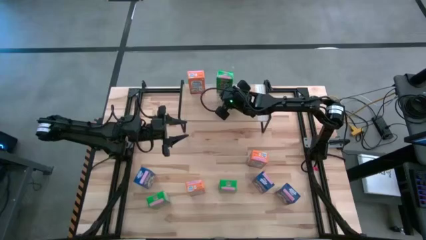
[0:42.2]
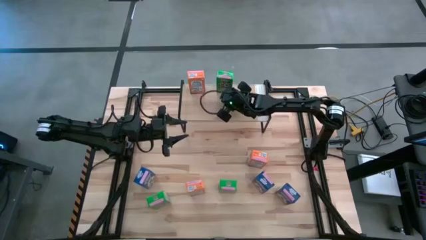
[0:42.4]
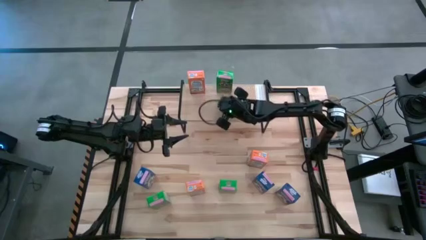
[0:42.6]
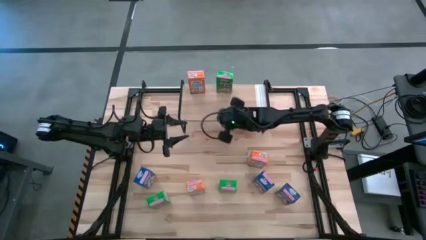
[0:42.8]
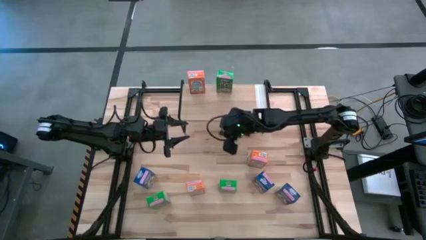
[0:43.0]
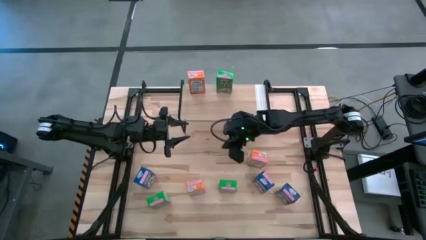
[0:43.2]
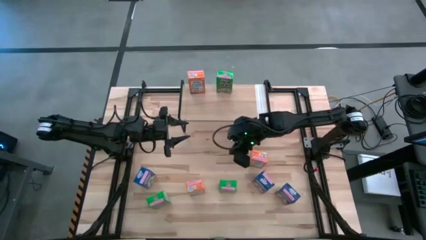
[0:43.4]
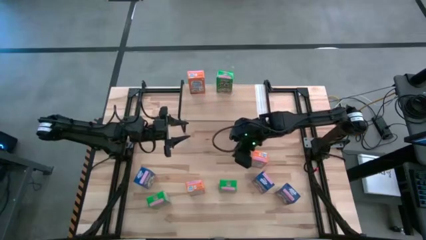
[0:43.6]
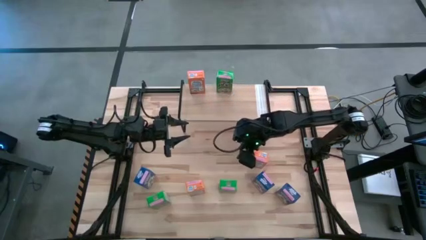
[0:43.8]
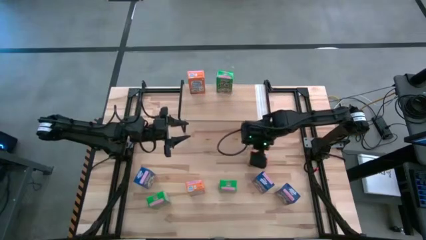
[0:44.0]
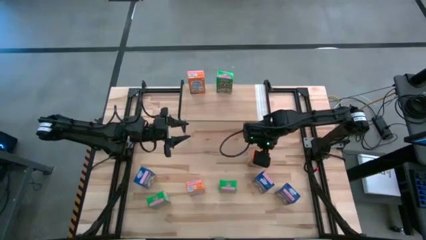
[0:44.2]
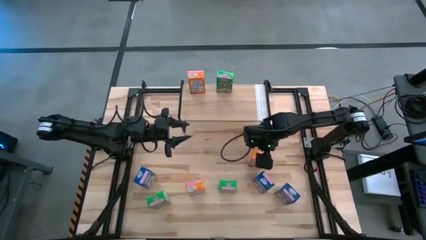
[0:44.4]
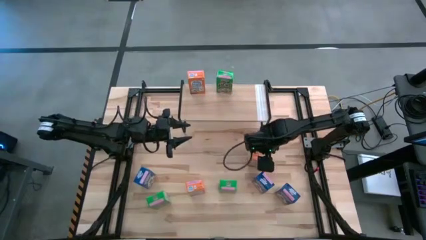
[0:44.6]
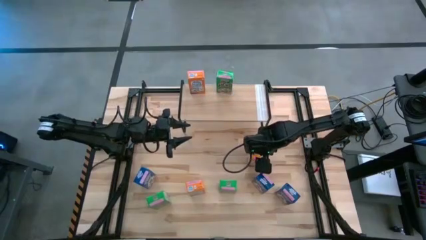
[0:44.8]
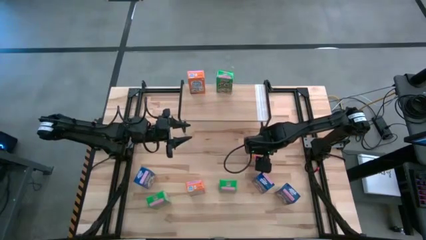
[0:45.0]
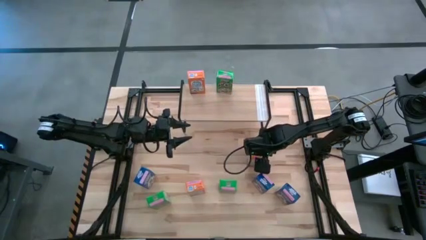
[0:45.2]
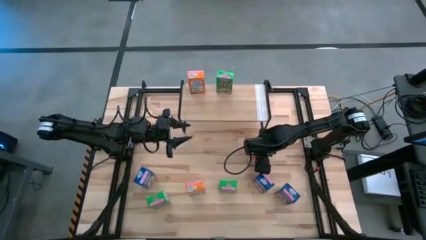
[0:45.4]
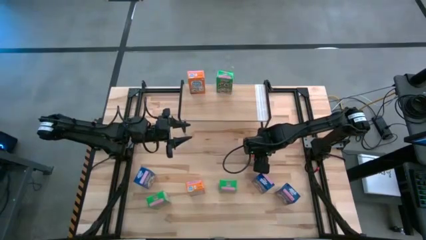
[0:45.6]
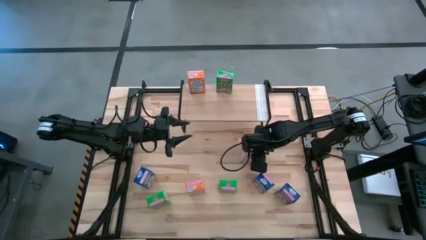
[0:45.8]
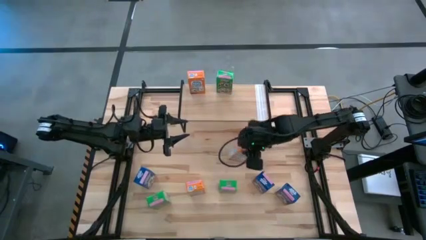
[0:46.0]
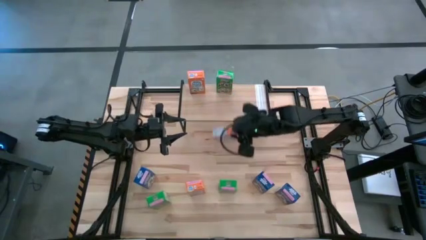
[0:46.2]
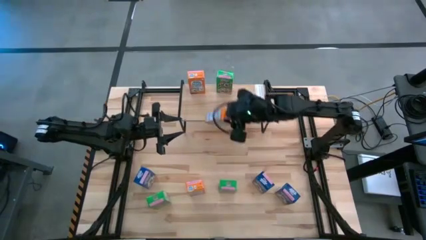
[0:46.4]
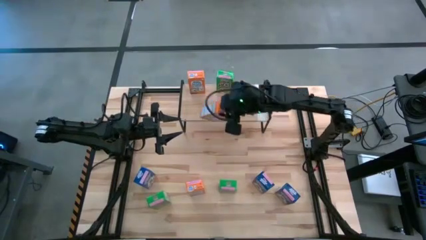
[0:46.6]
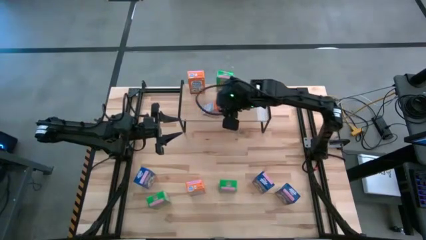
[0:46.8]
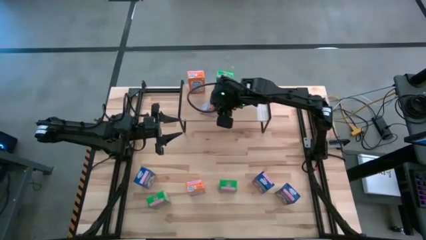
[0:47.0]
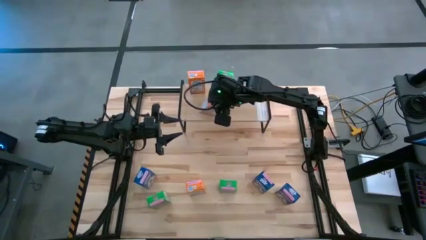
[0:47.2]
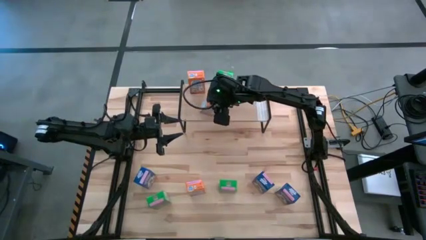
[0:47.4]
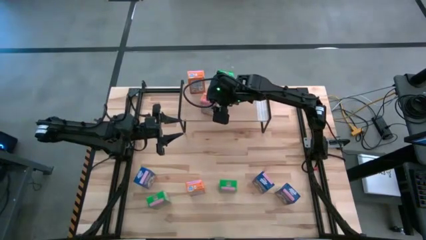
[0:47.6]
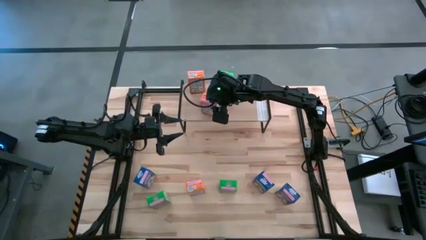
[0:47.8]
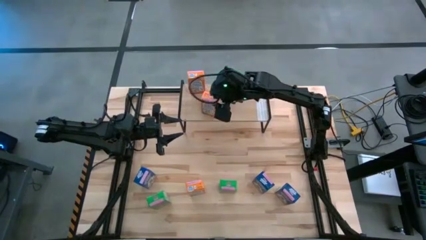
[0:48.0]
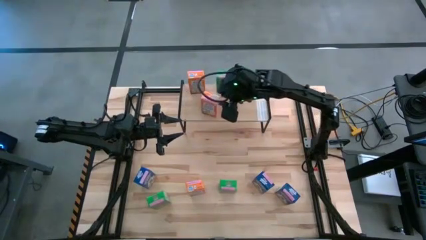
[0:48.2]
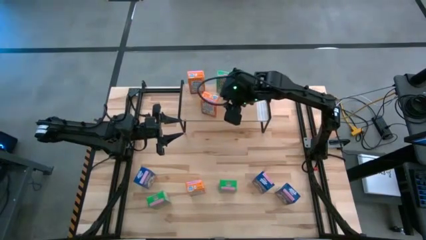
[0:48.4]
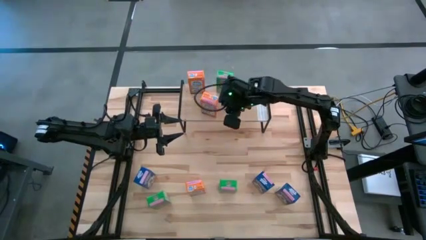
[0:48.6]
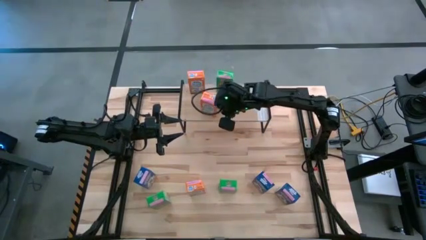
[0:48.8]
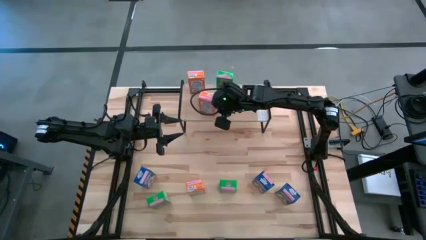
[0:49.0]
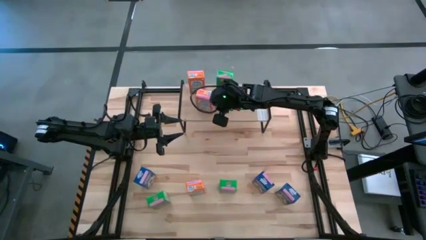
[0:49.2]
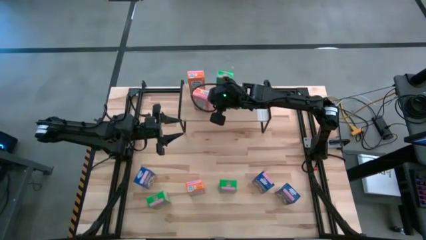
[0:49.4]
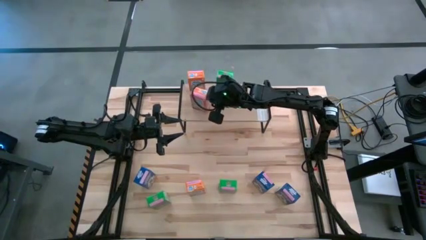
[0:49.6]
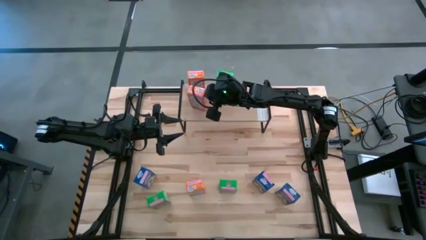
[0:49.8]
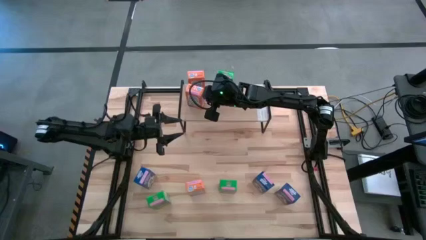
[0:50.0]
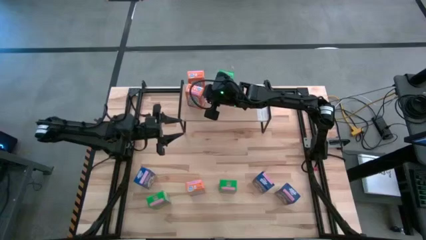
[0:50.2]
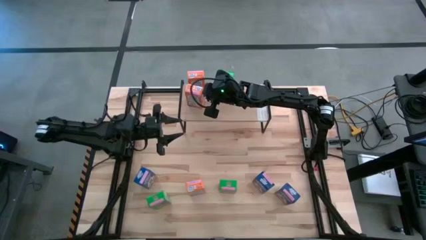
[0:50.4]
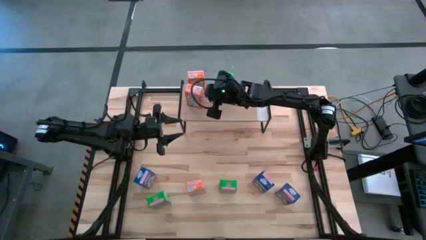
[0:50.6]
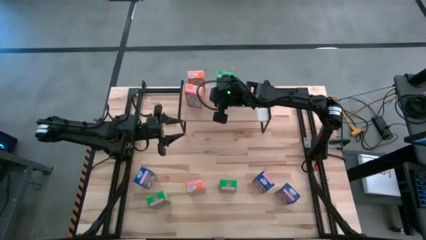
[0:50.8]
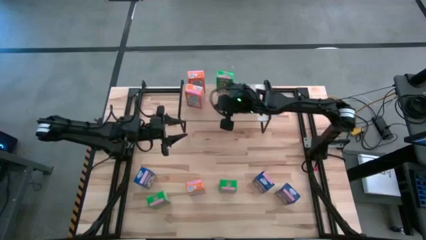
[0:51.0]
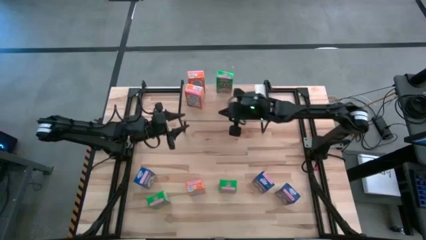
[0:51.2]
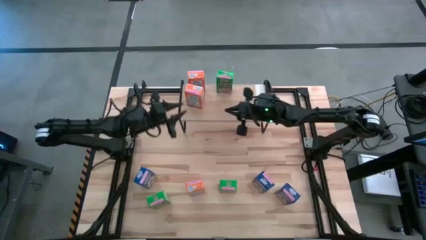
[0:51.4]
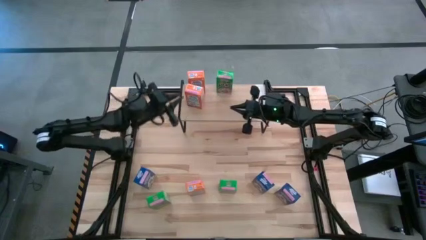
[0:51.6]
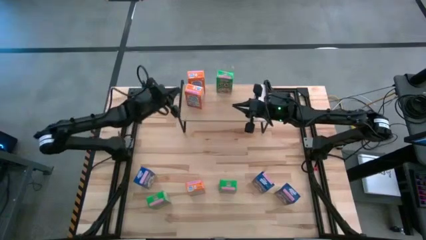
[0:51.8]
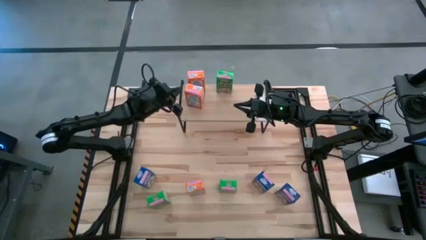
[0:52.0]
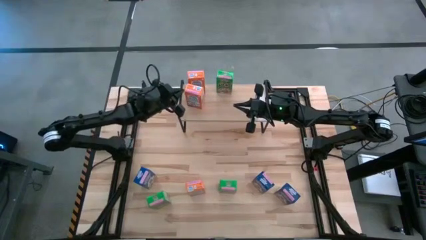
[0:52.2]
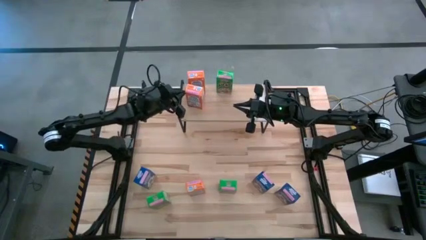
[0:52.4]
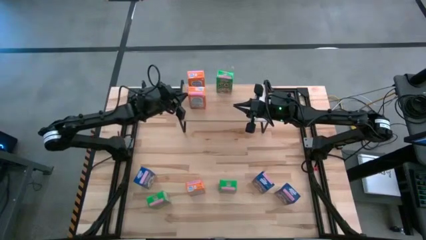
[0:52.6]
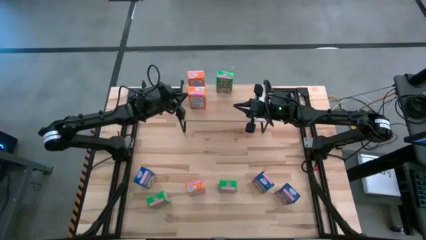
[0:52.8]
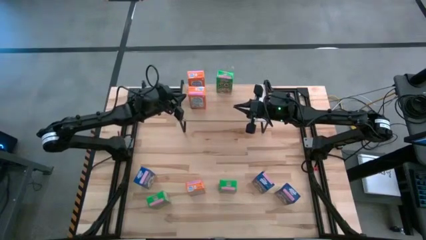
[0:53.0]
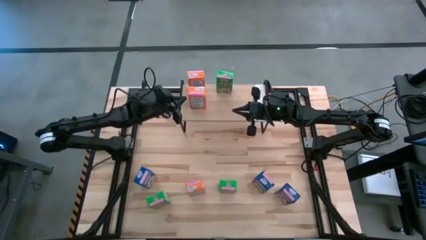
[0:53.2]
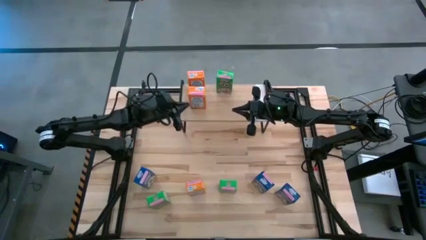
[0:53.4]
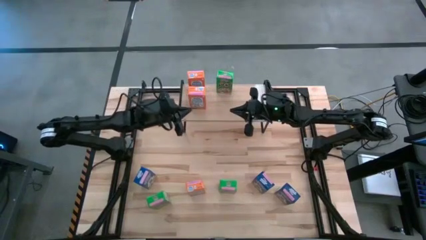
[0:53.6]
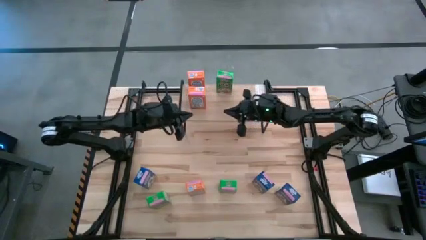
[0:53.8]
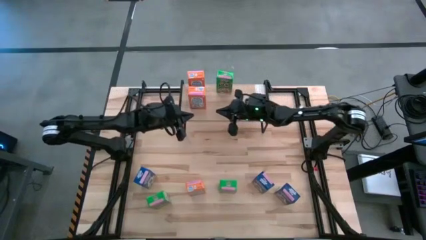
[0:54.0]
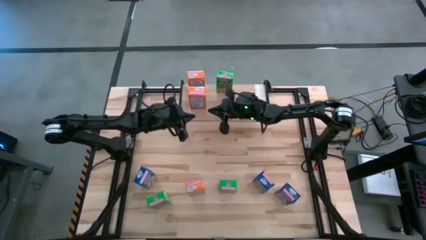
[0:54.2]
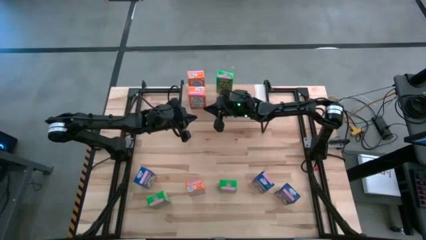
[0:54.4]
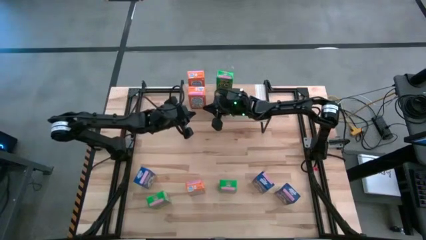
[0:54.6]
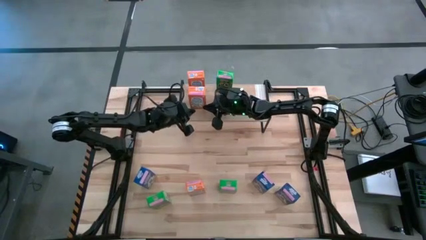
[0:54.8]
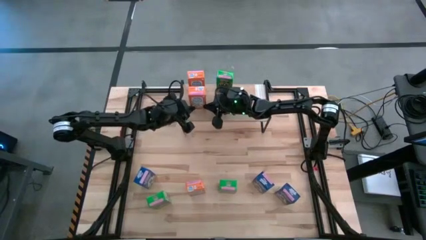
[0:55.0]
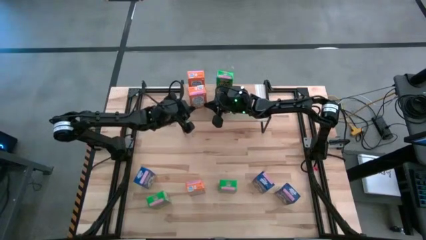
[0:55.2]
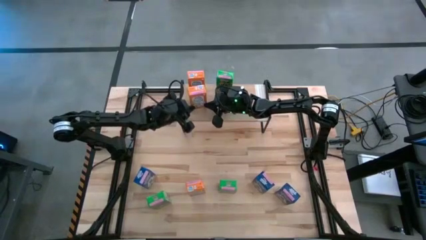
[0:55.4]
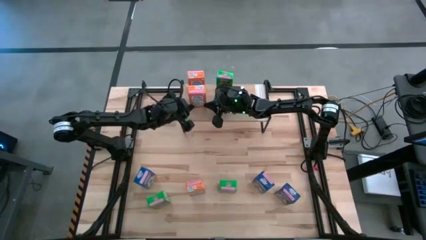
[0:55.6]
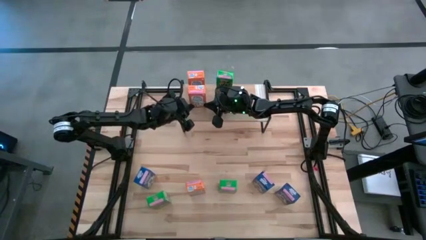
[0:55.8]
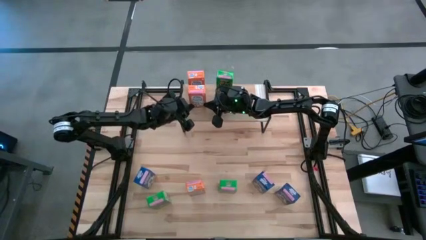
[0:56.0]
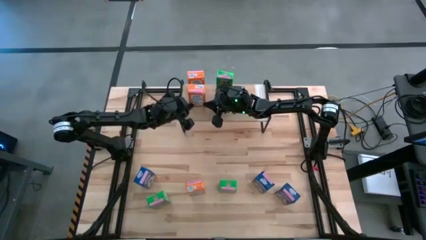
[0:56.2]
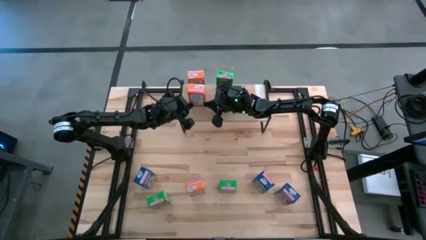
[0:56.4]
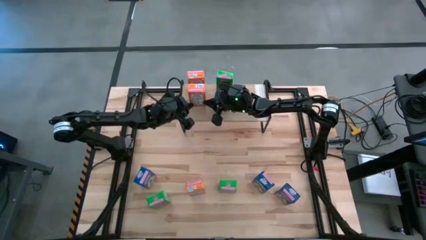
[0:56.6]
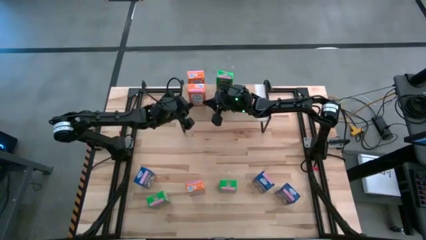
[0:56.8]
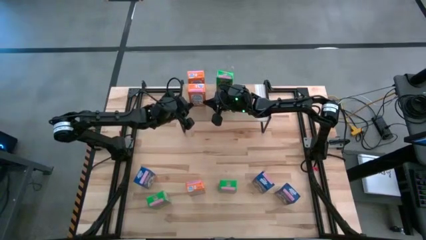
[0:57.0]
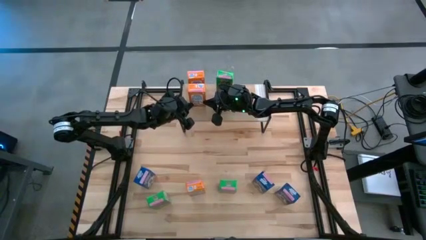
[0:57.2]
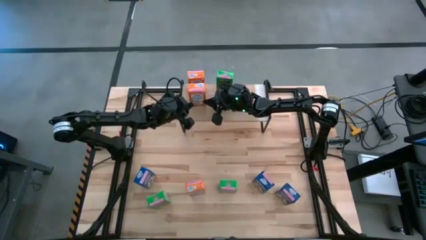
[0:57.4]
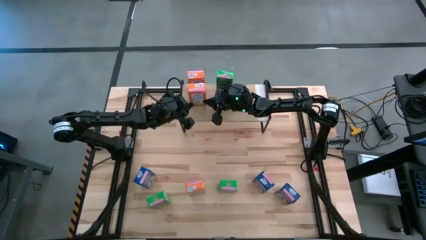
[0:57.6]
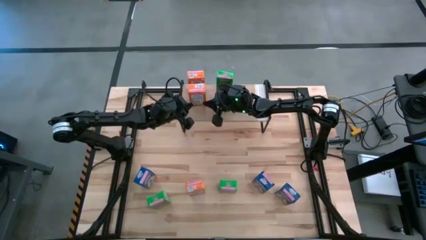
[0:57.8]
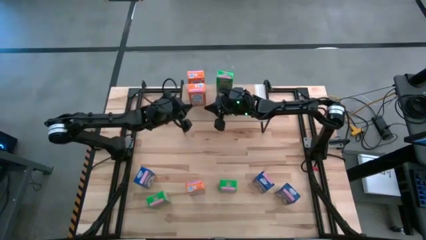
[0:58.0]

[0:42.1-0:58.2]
Task: Stack cereal on shelf
Put the right orange cereal box aligned with the other orange cereal box on the shelf
